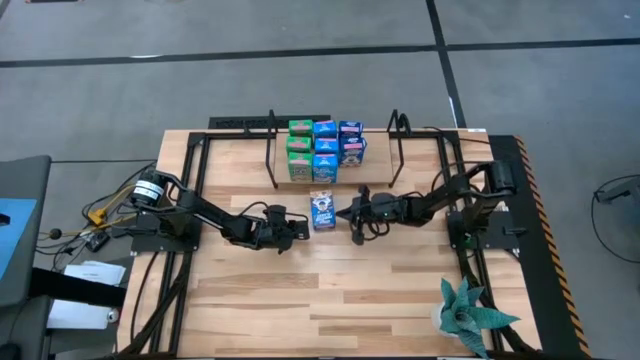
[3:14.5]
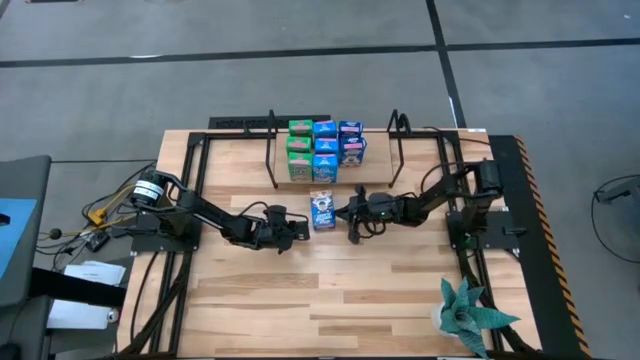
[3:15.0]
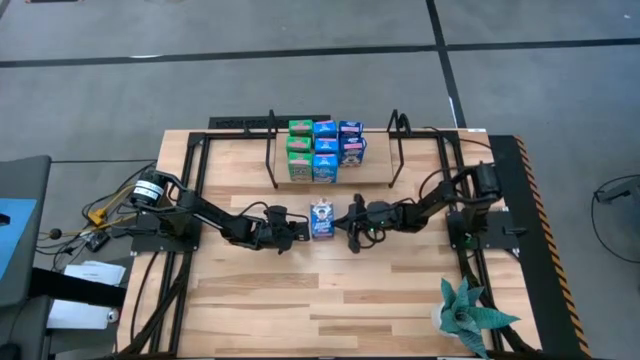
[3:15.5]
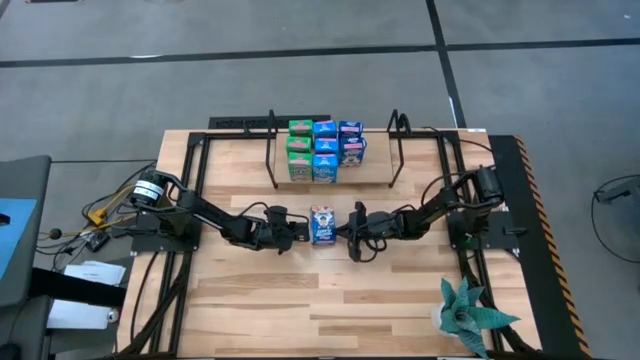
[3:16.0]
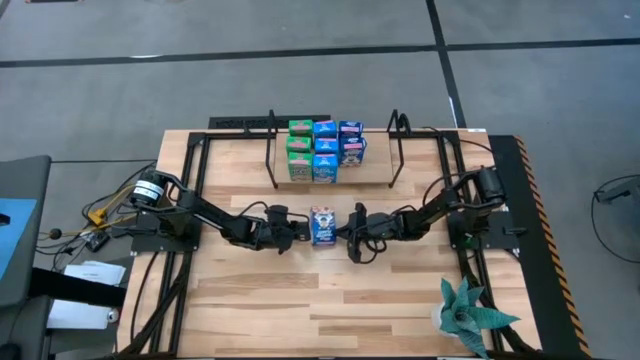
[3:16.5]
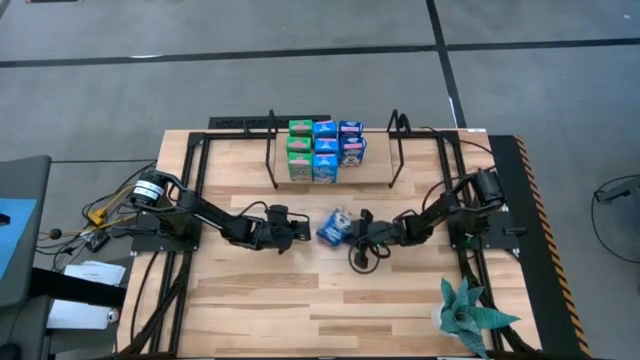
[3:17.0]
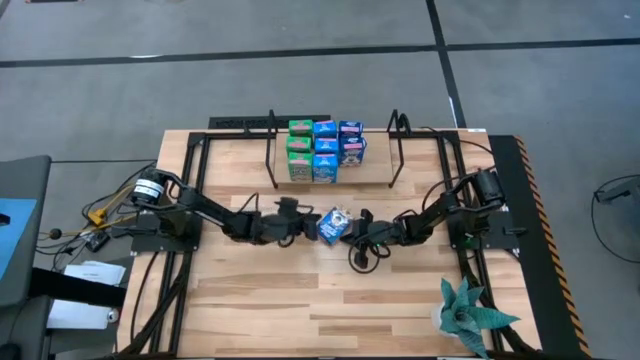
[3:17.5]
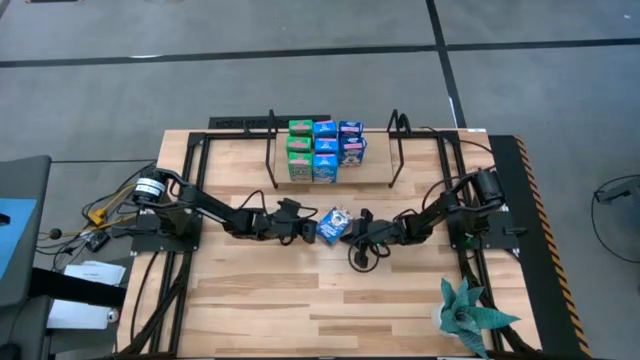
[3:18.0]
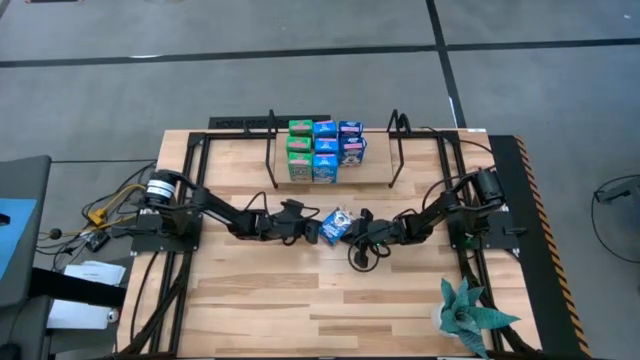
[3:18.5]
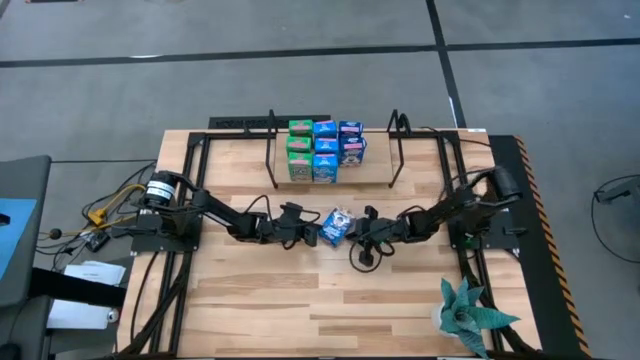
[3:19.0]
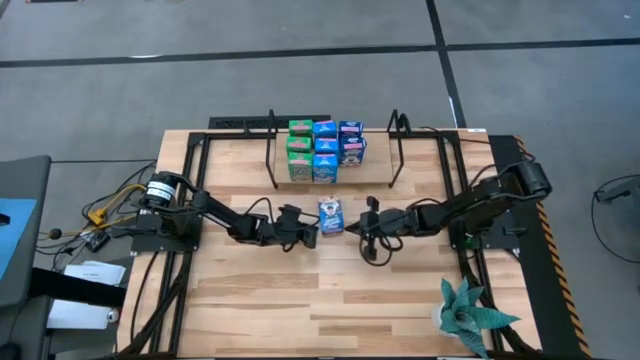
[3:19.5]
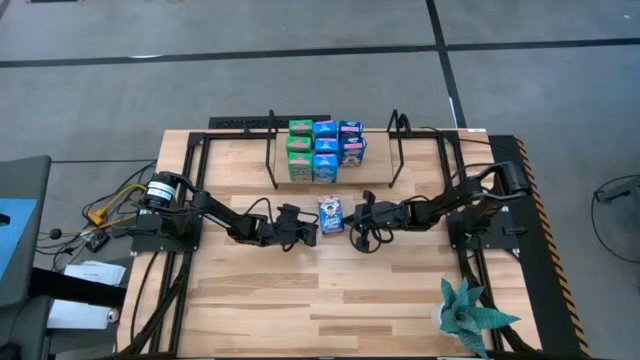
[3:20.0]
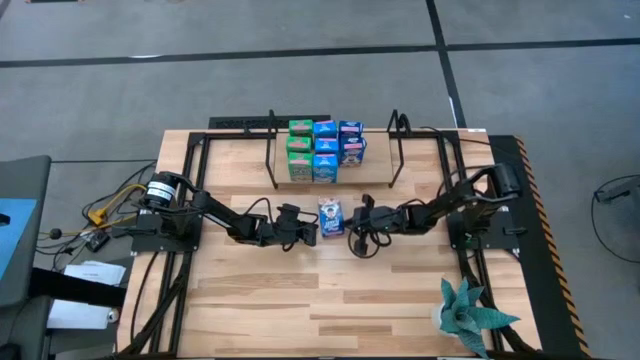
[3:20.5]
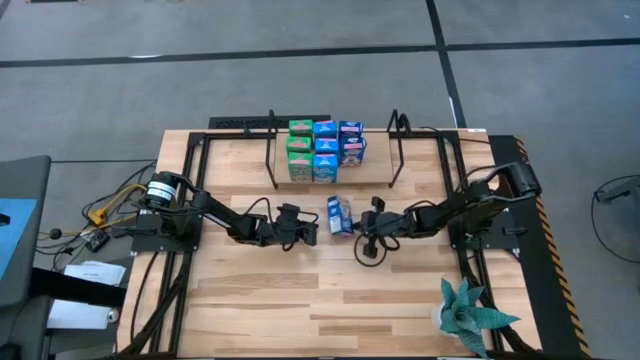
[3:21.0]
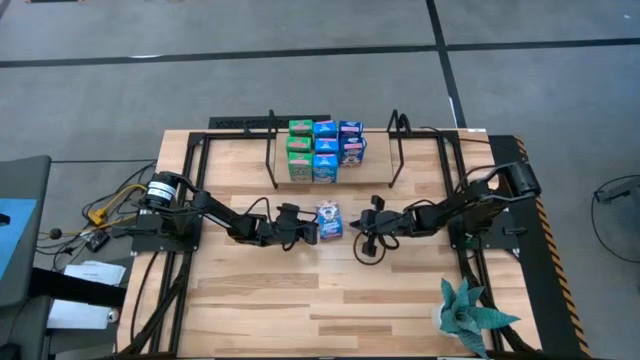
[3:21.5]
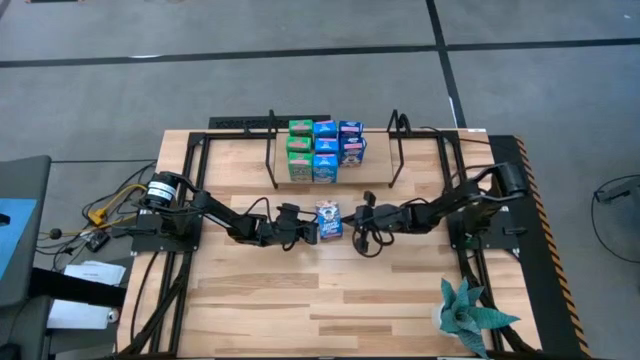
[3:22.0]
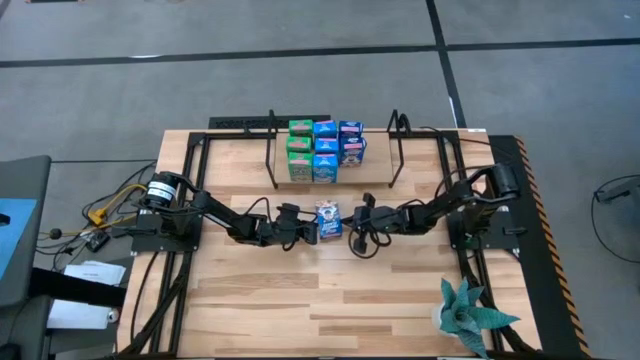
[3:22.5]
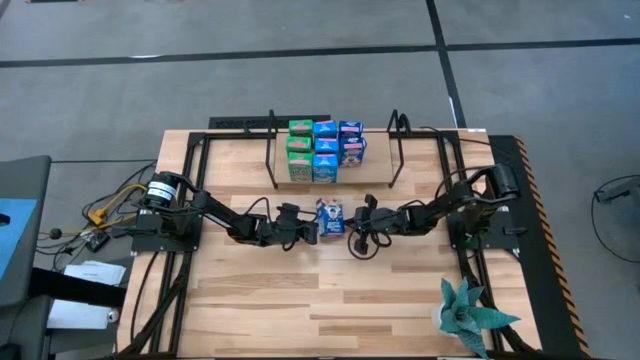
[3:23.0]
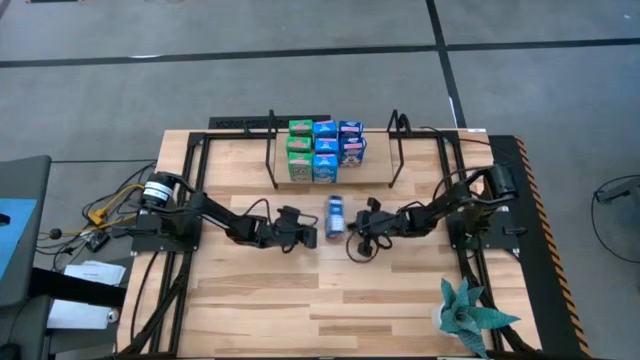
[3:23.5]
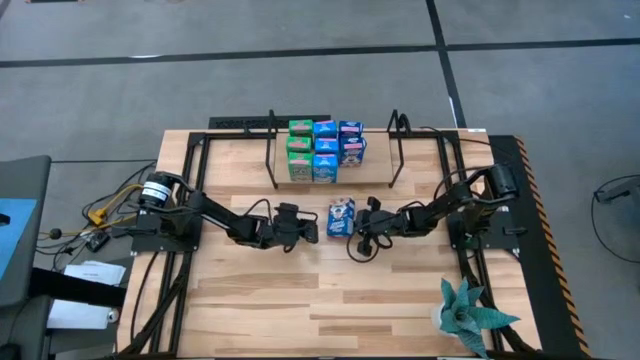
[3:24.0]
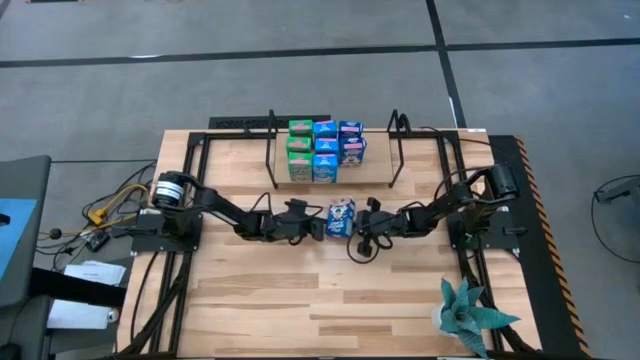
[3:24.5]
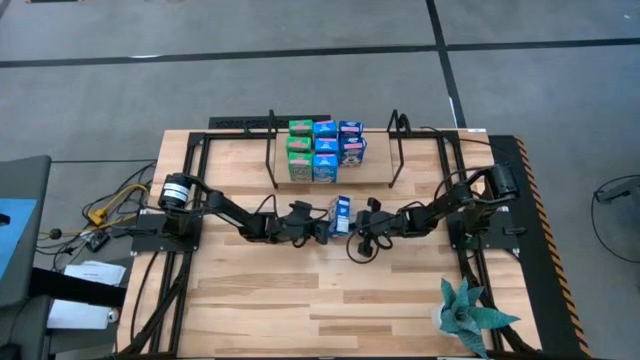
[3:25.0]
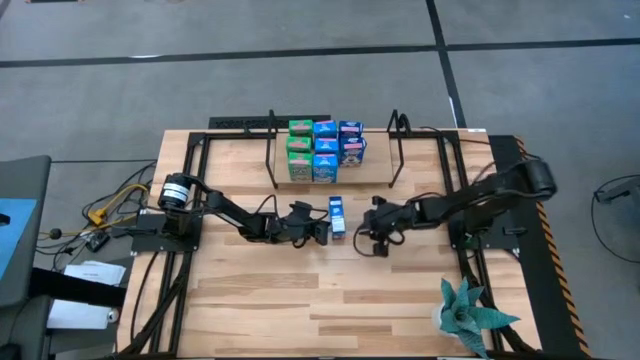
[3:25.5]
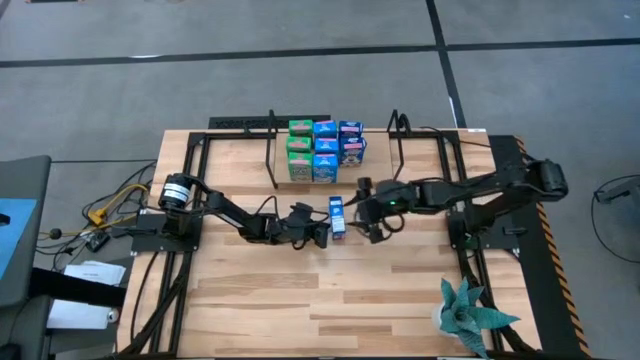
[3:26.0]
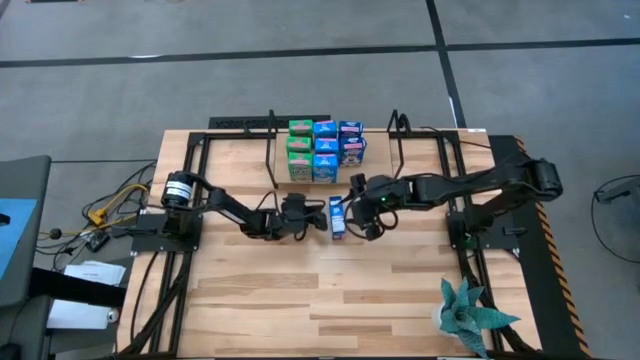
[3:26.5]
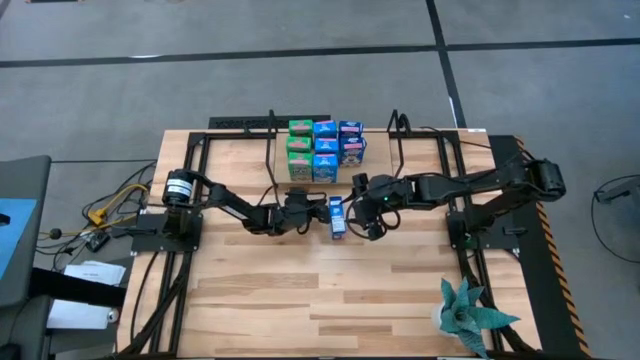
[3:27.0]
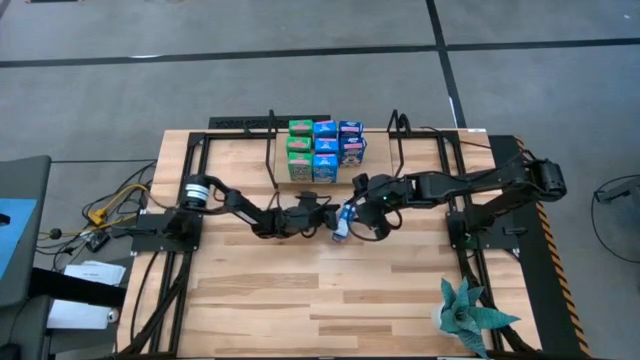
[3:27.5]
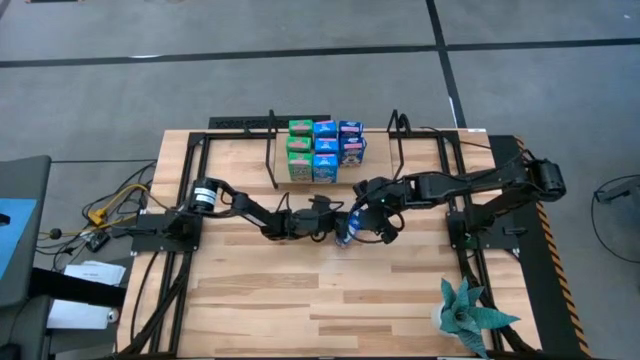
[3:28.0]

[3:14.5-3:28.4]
Task: Stack cereal on shelf
Put the blue cereal box on the shelf aligned with the blue cereal box

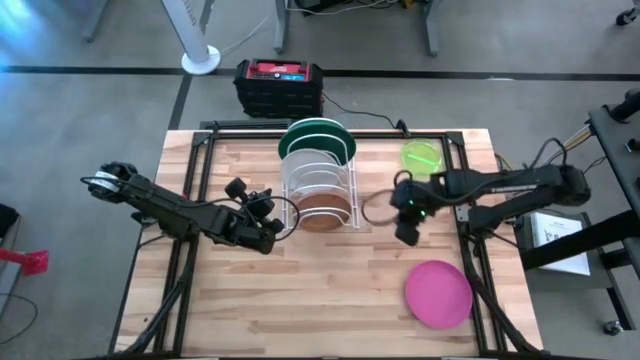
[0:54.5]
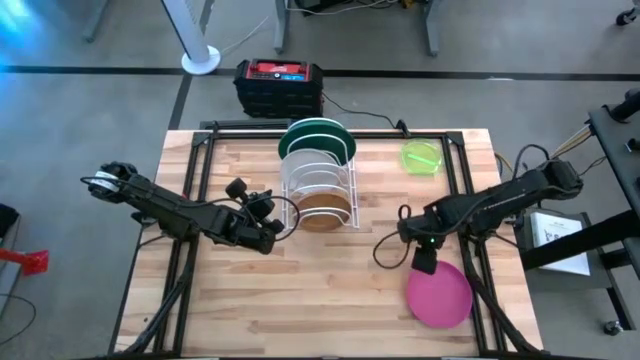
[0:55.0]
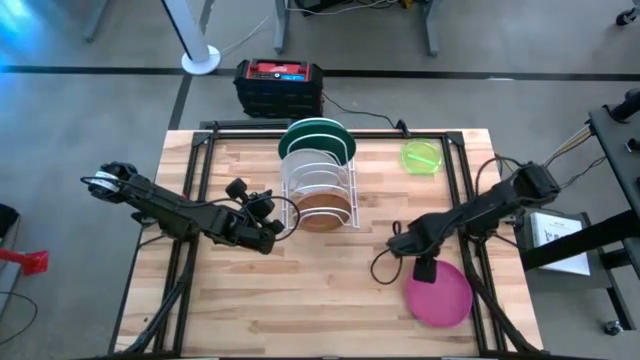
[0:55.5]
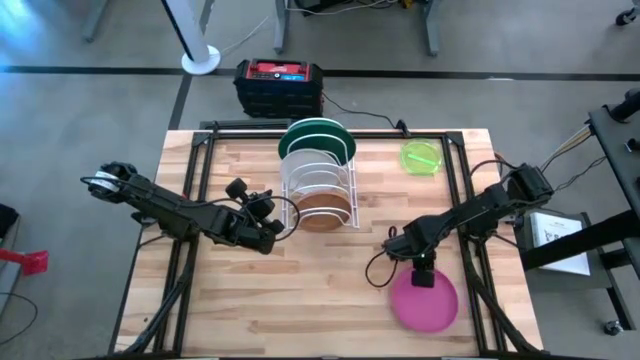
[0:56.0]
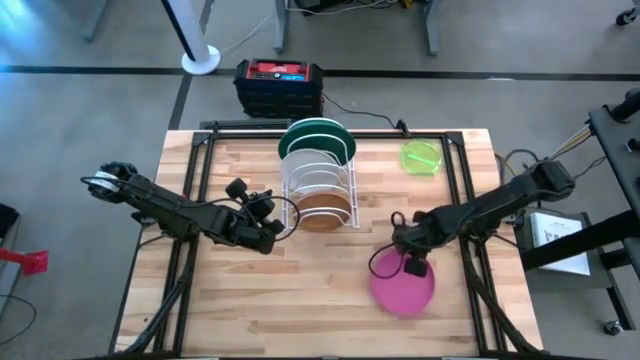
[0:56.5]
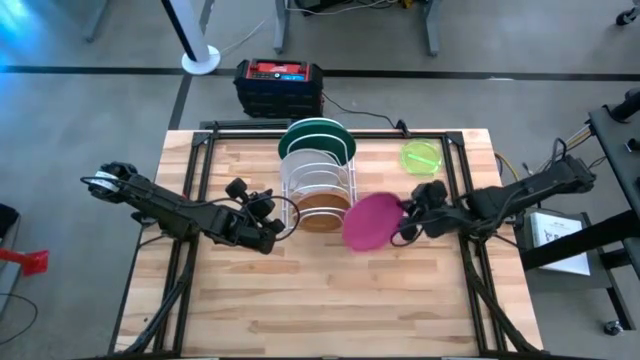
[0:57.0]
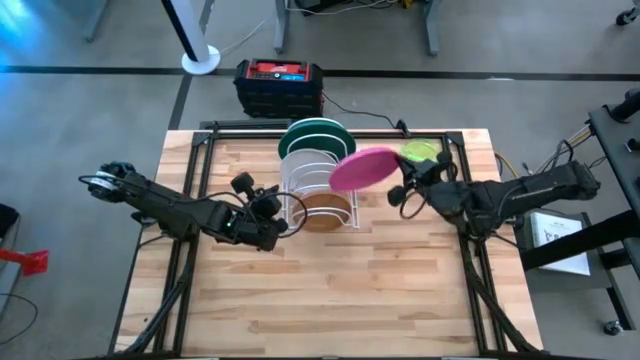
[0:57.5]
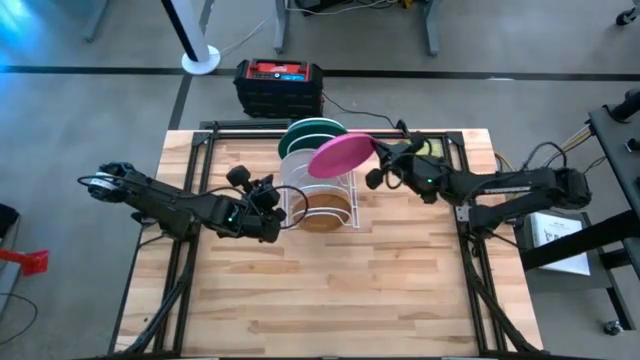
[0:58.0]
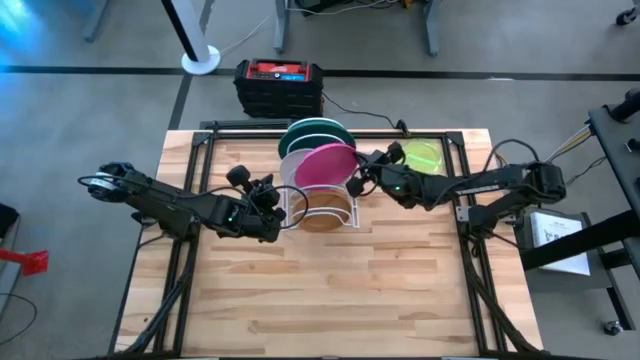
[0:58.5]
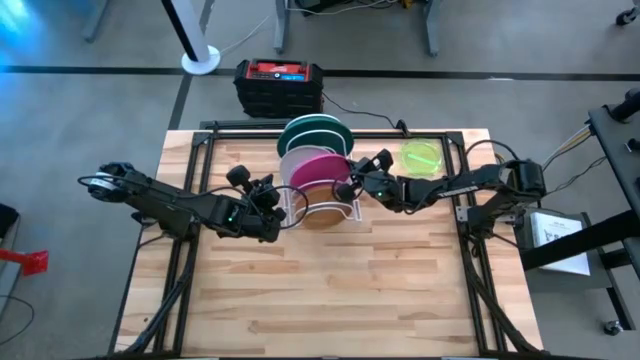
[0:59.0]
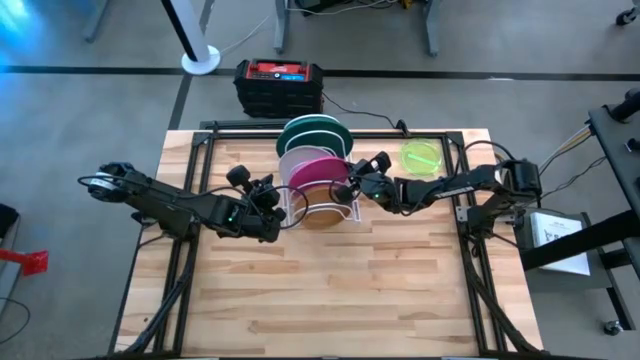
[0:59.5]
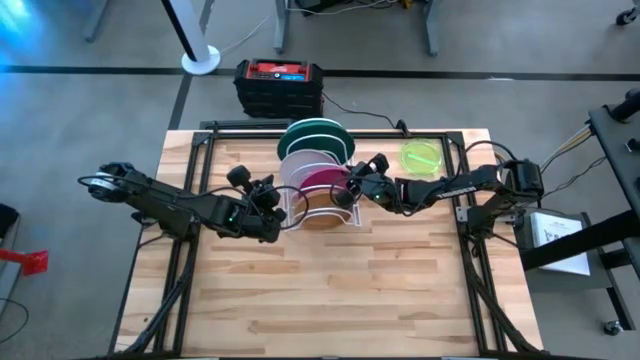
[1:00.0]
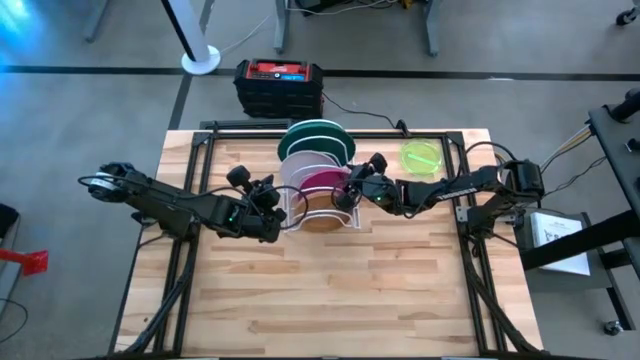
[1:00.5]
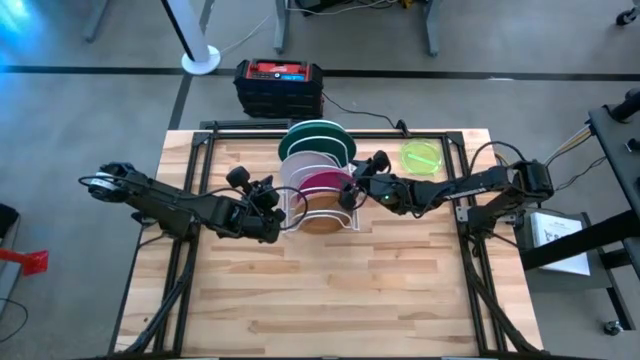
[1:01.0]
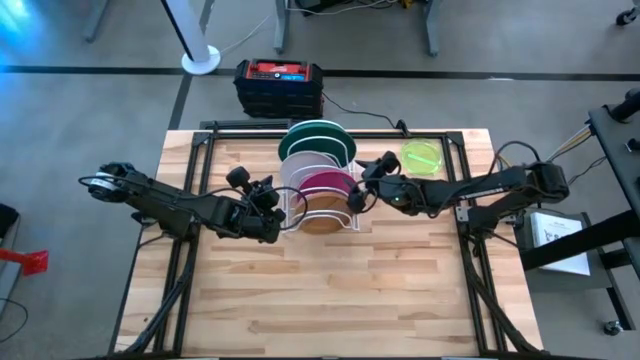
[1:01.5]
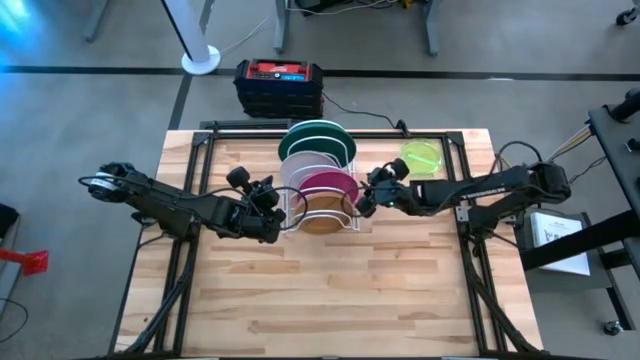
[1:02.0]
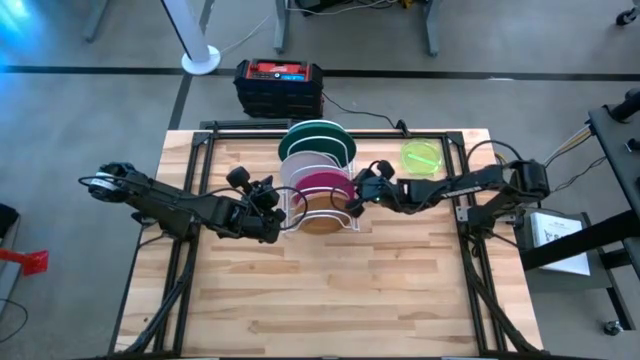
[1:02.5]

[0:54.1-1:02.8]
Task: Sort dishes
Put the pink plate into the dish rack
